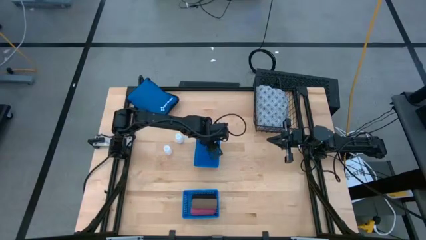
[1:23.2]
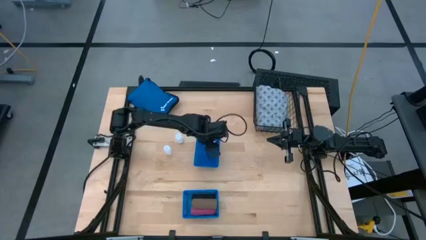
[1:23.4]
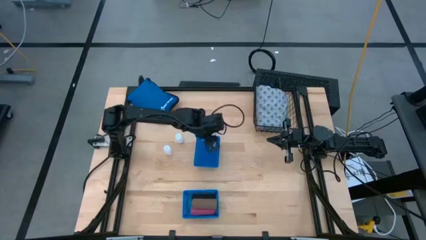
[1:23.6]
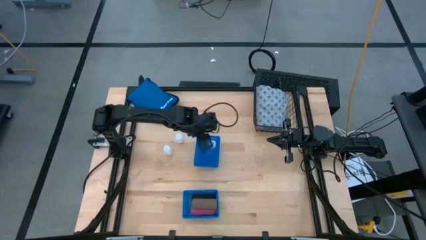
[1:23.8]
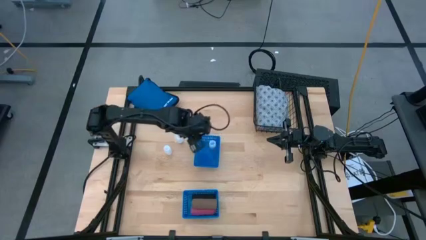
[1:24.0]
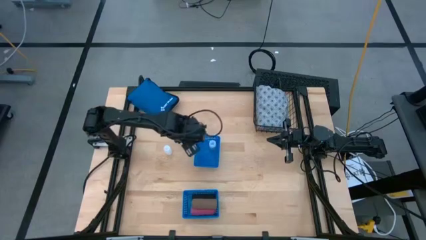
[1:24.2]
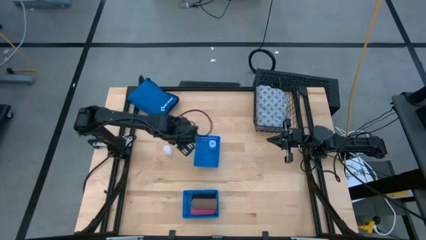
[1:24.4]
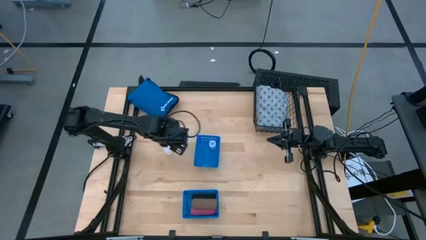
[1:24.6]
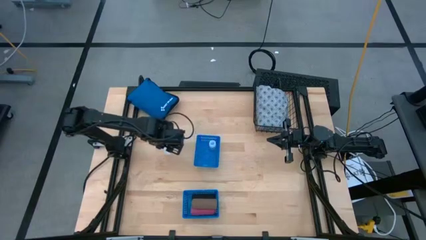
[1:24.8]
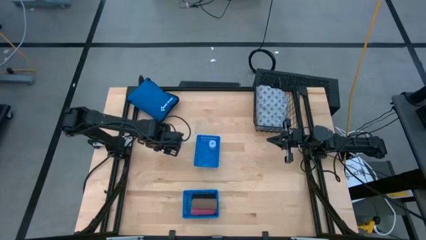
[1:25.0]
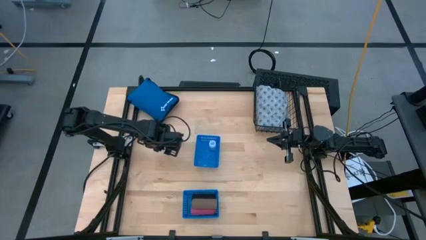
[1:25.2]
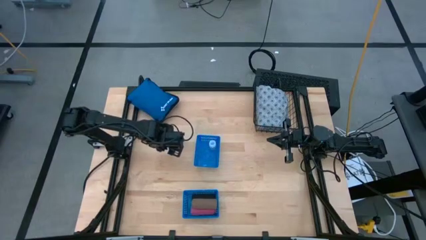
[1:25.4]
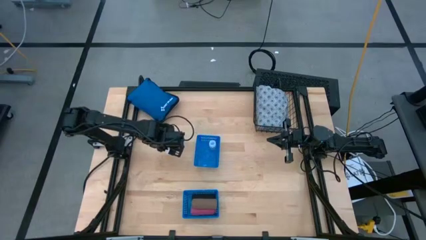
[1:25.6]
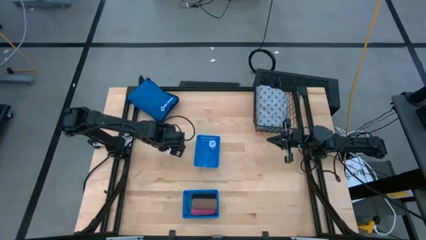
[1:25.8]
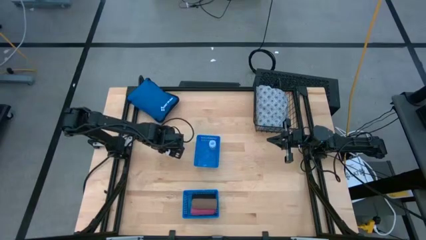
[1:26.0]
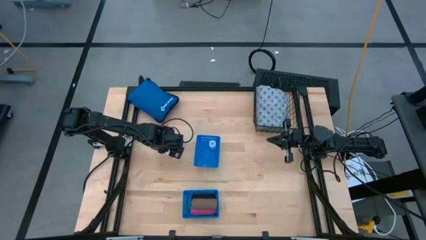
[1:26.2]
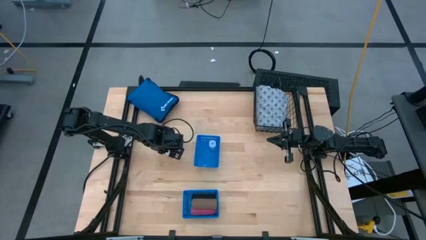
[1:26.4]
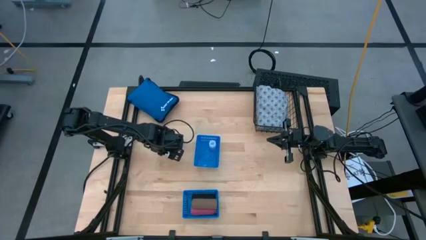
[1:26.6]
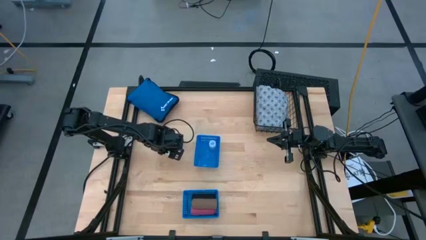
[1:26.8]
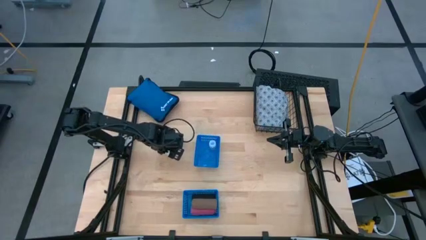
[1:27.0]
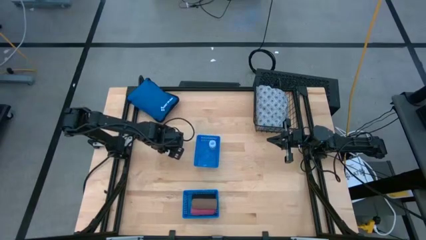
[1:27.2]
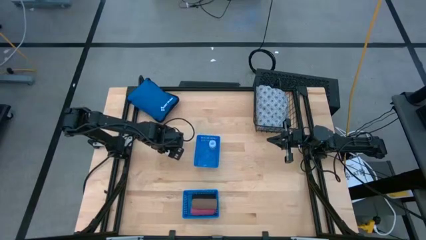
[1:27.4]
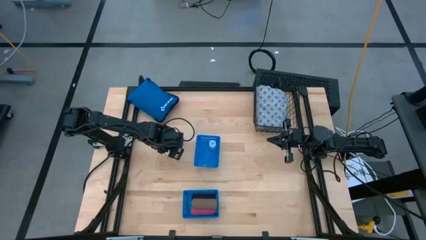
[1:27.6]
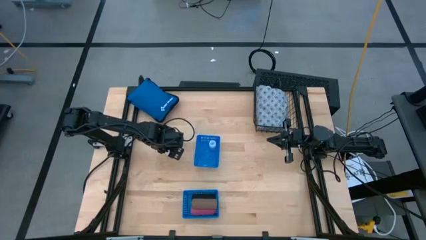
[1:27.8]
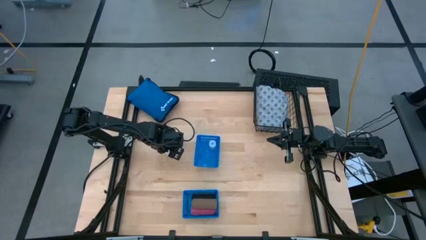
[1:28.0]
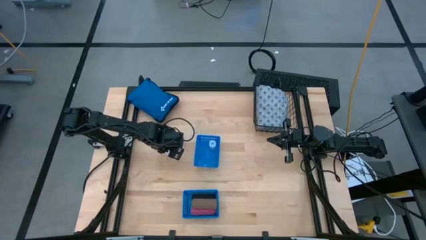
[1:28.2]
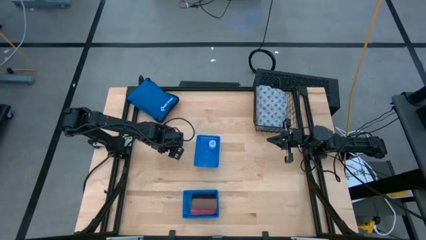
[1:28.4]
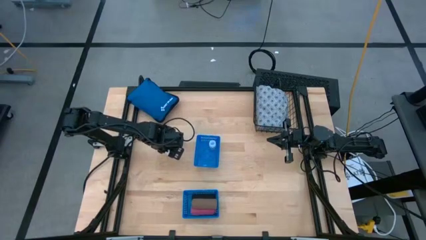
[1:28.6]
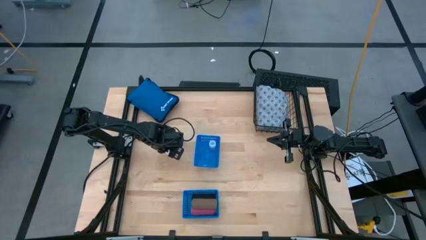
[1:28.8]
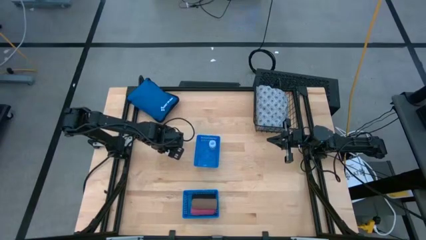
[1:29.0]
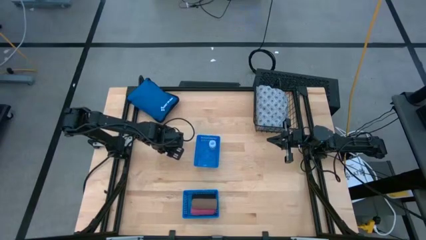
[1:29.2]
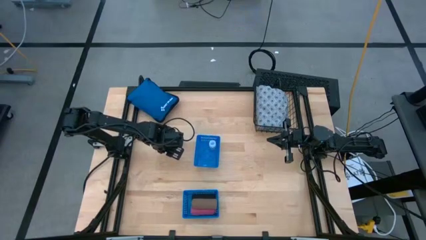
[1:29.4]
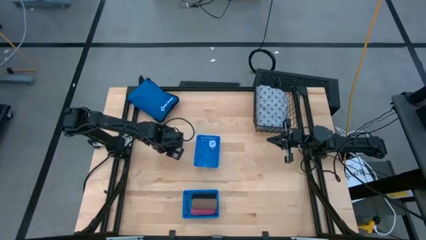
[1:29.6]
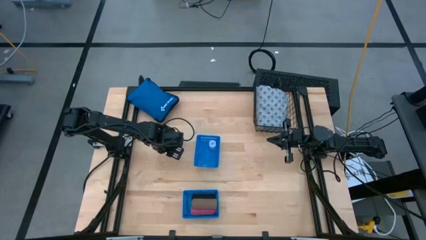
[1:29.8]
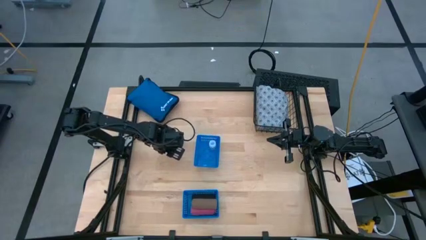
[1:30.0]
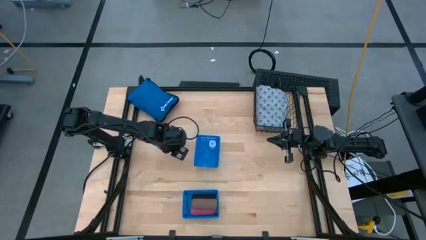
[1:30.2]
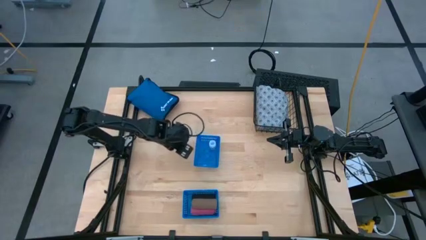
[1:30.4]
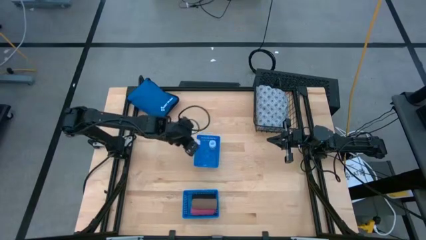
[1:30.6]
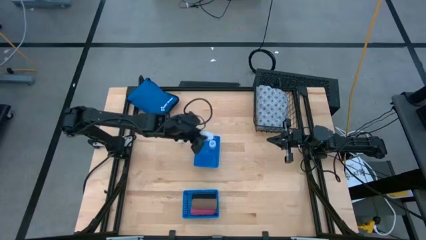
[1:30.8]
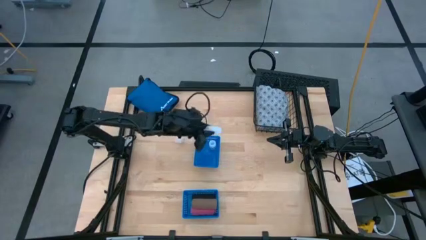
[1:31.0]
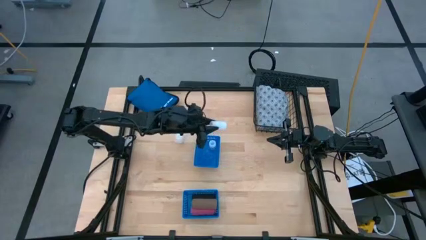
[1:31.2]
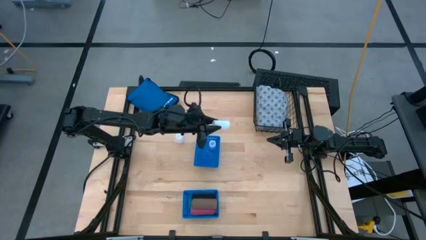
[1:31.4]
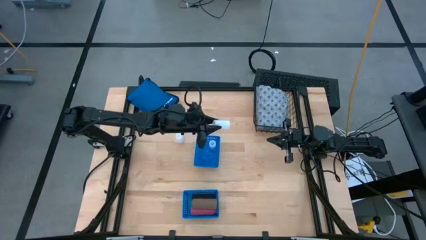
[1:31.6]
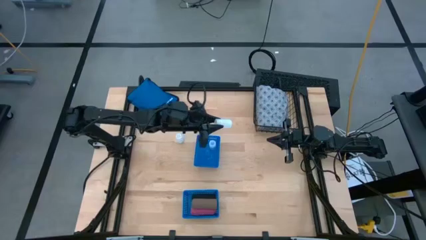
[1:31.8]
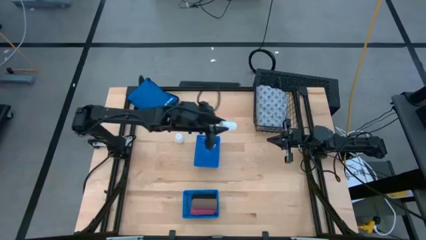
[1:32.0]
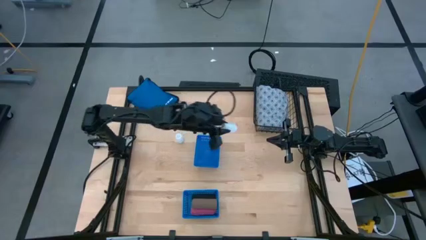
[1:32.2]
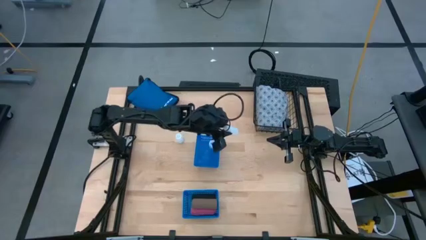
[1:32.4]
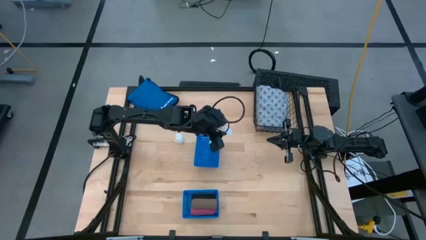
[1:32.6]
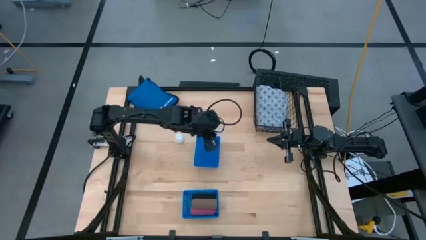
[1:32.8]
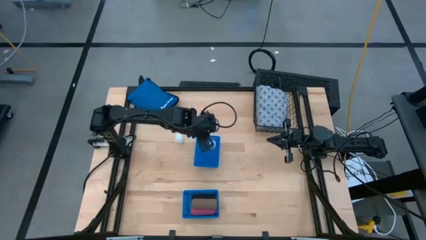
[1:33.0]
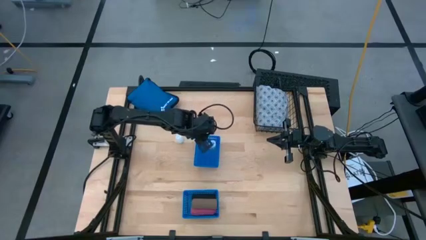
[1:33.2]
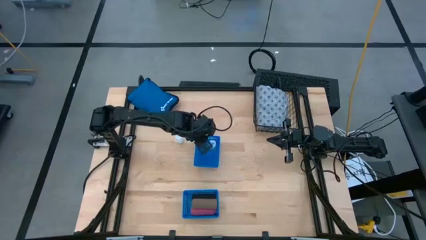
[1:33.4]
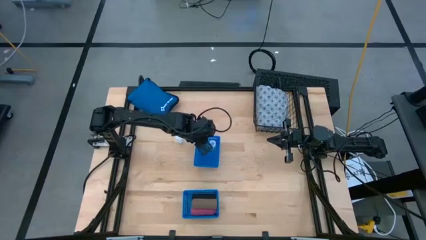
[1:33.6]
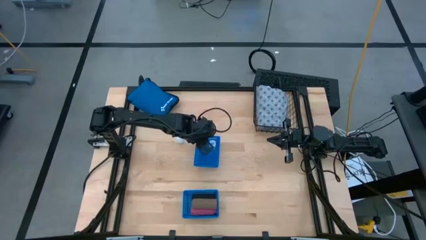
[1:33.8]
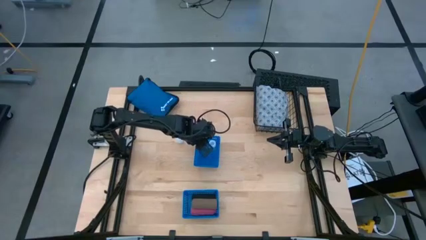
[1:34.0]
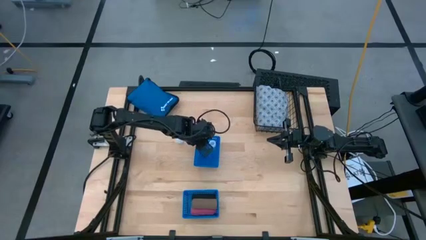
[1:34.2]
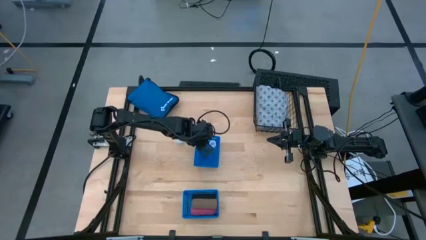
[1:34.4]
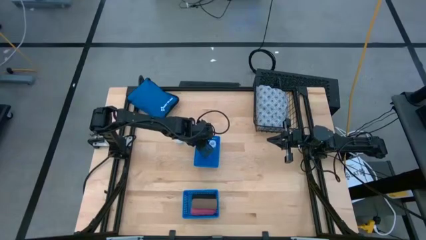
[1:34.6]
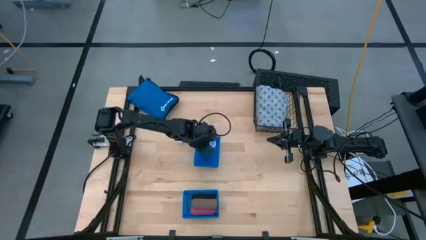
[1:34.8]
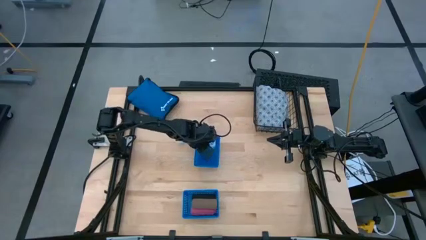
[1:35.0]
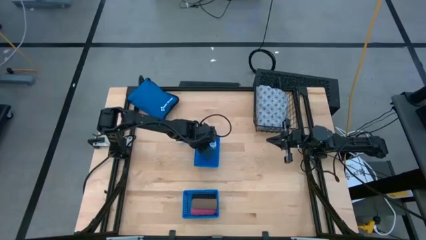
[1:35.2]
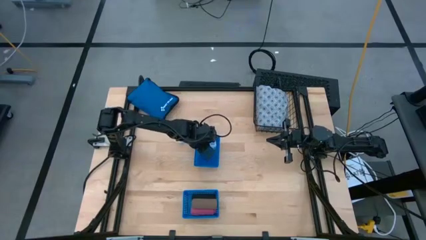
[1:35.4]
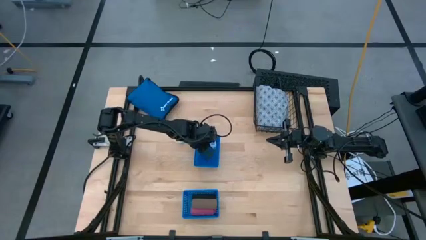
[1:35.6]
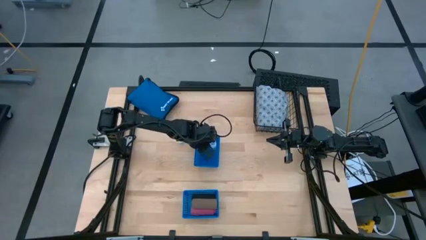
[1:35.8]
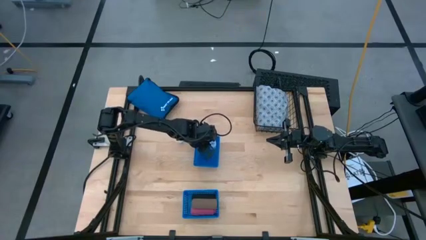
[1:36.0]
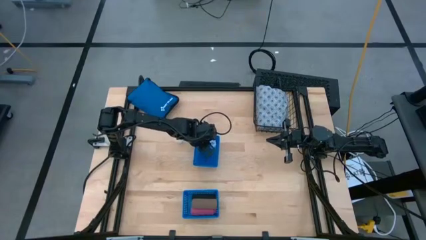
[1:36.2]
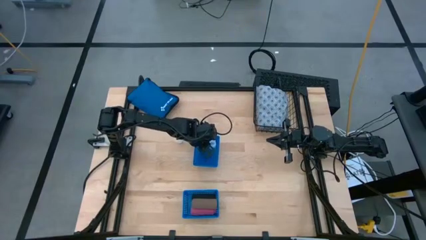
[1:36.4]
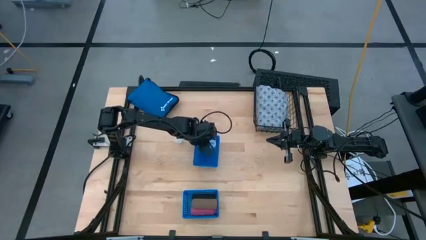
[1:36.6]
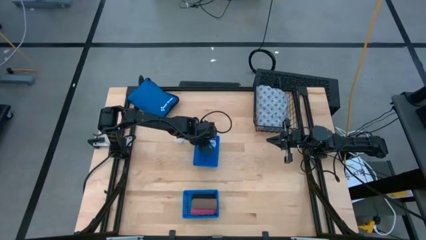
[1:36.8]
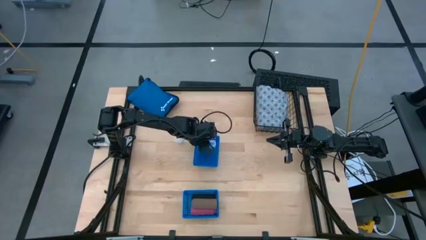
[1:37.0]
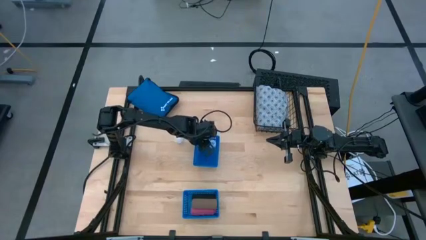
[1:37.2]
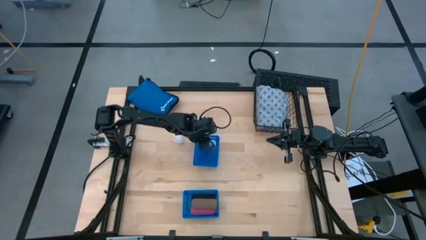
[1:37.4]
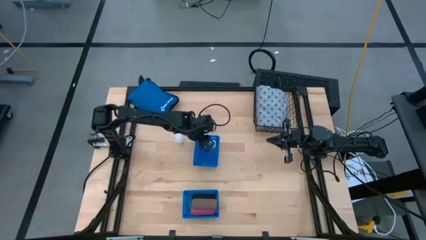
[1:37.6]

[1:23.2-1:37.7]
Task: Pick & place medical supplies in basket/bin
Put the bottom white pill bottle into the top blue bin

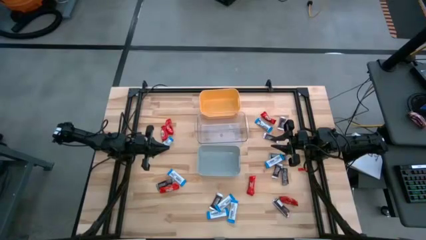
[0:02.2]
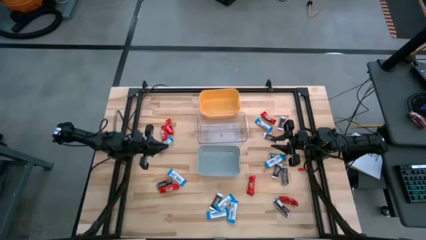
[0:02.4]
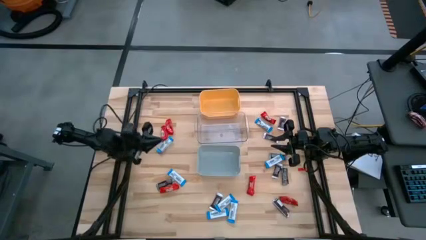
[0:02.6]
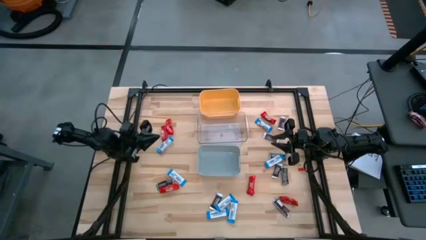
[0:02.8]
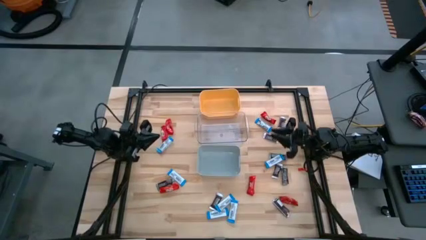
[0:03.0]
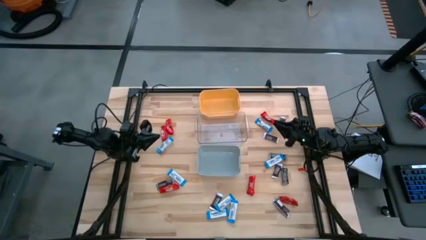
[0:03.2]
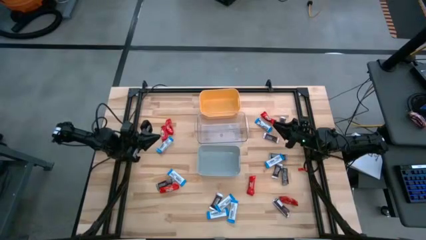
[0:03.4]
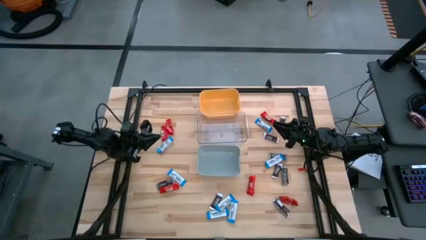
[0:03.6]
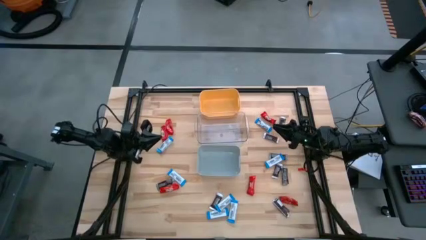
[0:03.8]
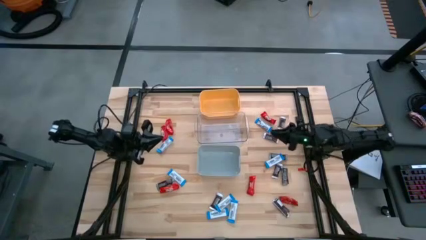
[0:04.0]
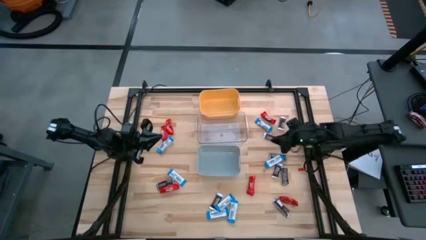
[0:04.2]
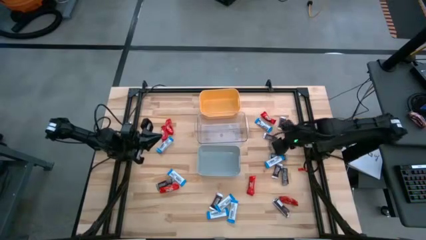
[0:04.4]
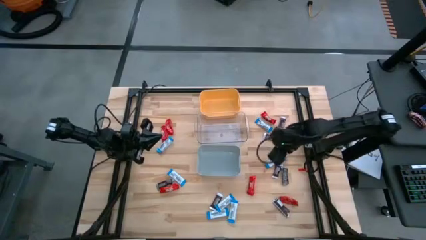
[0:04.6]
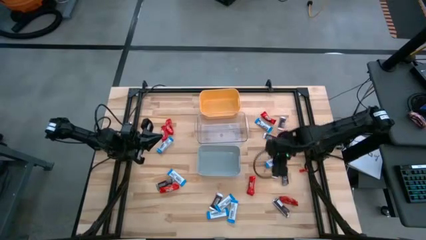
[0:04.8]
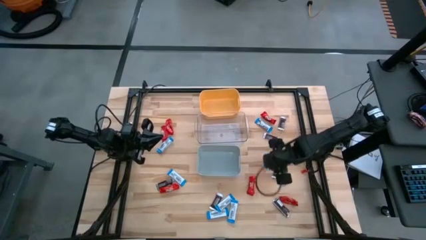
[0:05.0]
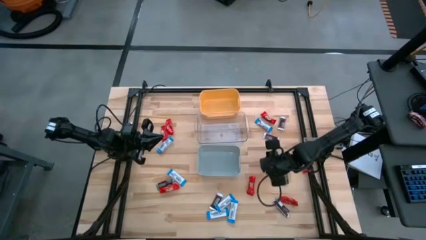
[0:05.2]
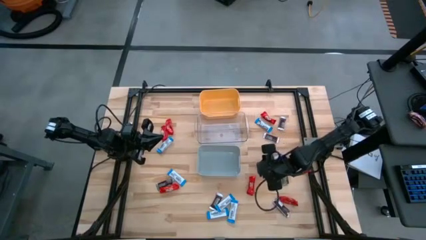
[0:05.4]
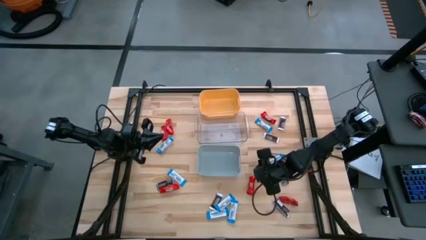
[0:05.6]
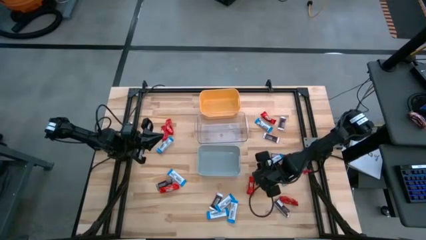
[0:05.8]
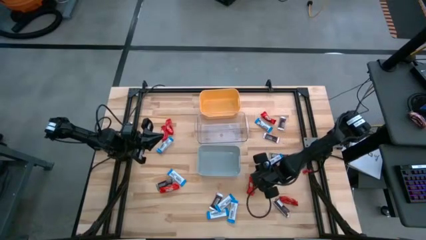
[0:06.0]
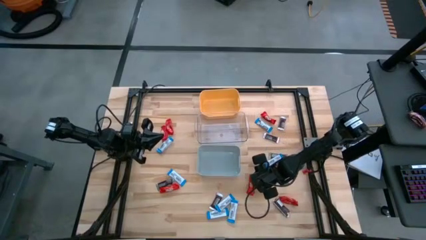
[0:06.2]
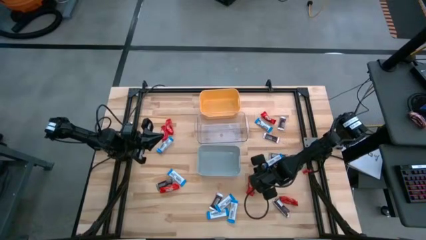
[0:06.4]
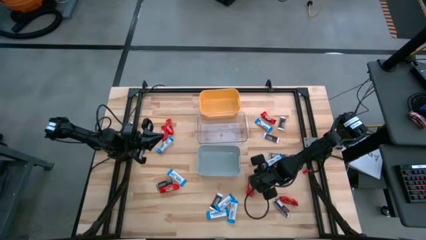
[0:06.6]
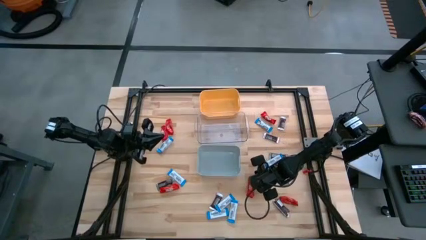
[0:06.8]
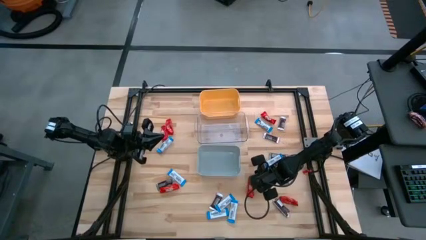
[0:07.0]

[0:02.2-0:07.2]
Task: Organize candy in baskets
Put the red chocolate bar into the transparent bin
